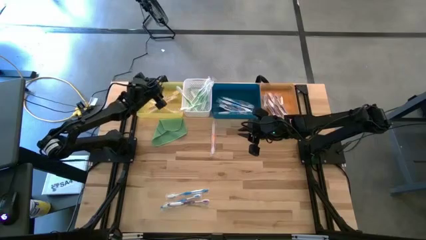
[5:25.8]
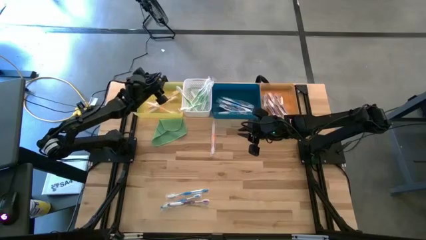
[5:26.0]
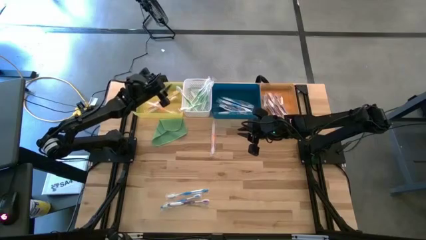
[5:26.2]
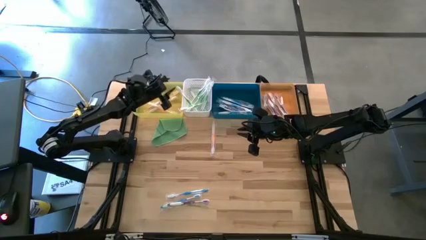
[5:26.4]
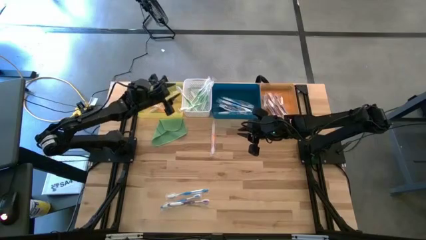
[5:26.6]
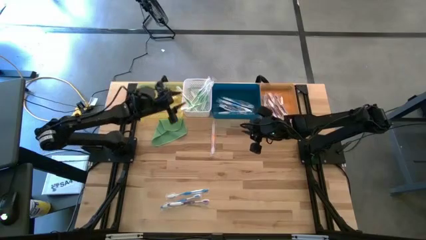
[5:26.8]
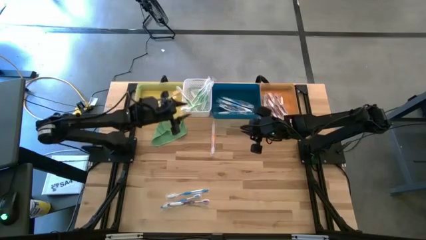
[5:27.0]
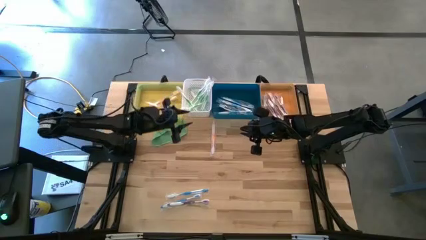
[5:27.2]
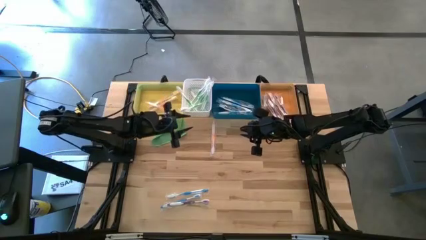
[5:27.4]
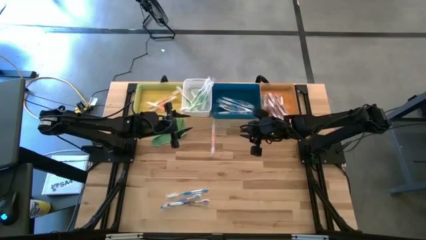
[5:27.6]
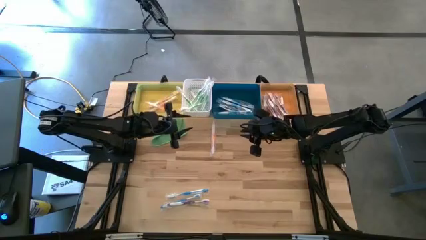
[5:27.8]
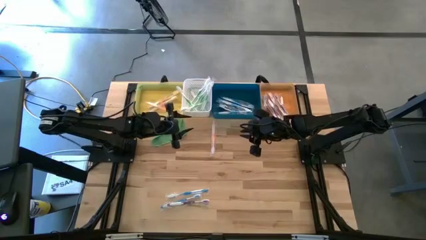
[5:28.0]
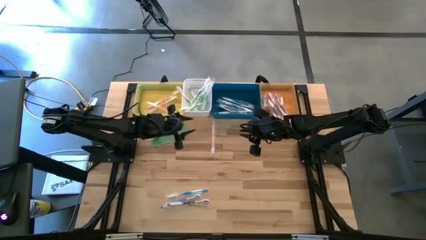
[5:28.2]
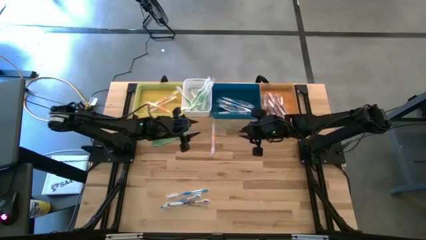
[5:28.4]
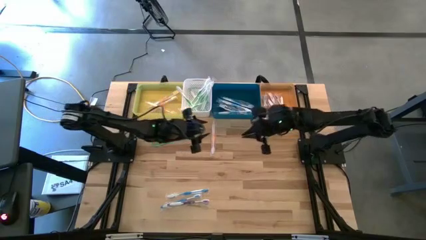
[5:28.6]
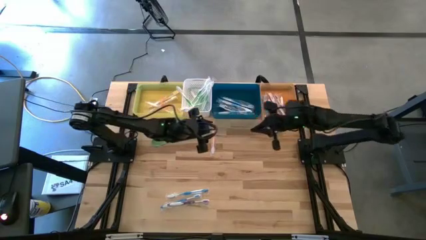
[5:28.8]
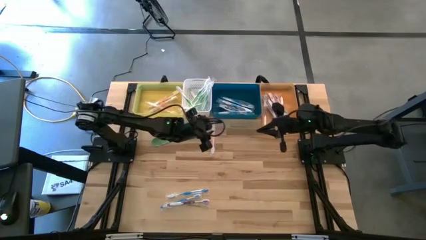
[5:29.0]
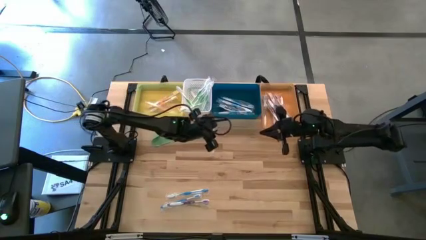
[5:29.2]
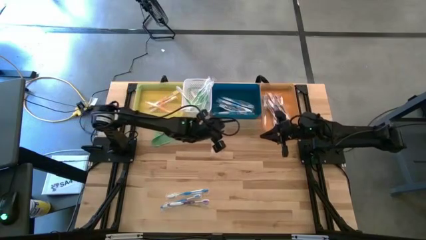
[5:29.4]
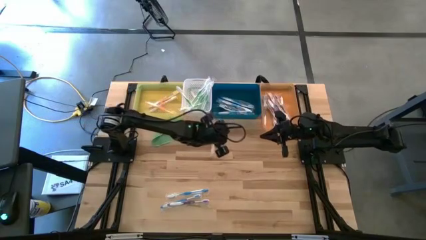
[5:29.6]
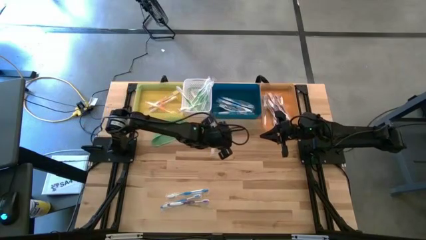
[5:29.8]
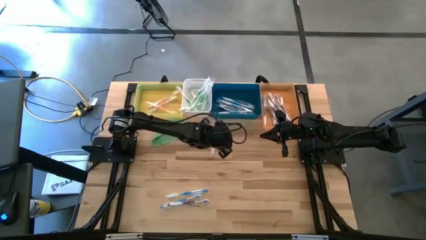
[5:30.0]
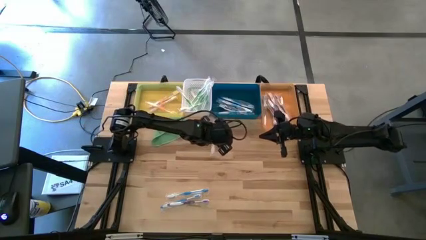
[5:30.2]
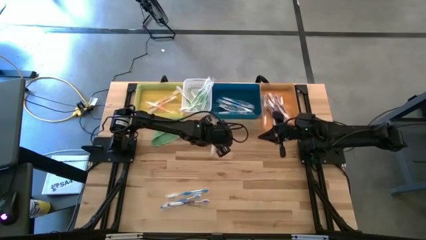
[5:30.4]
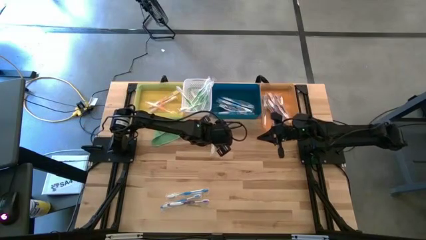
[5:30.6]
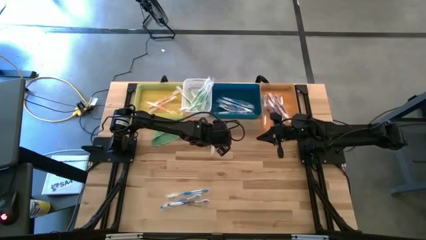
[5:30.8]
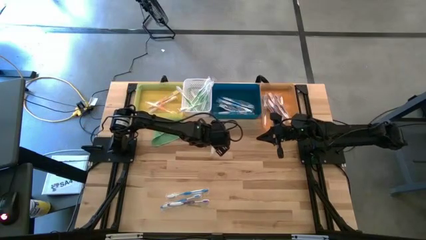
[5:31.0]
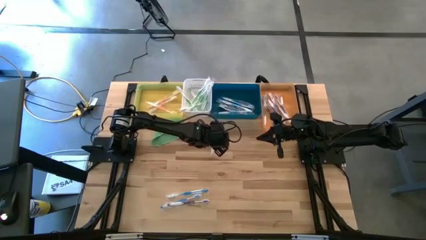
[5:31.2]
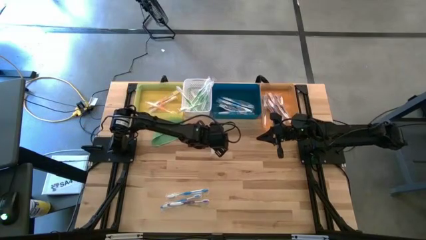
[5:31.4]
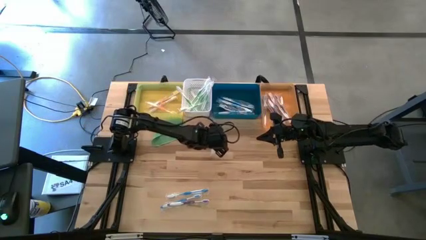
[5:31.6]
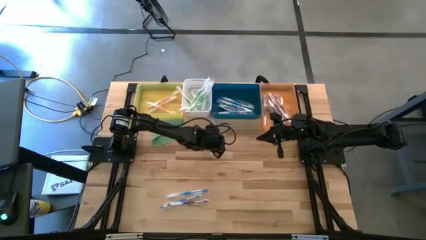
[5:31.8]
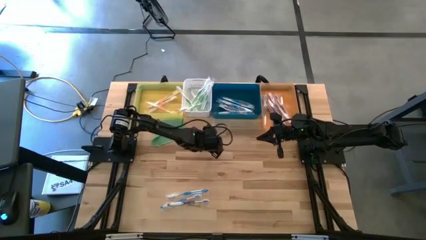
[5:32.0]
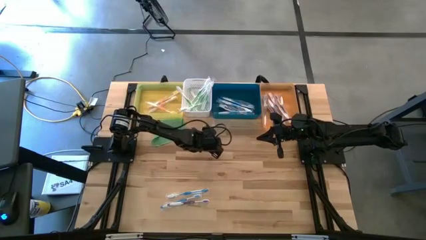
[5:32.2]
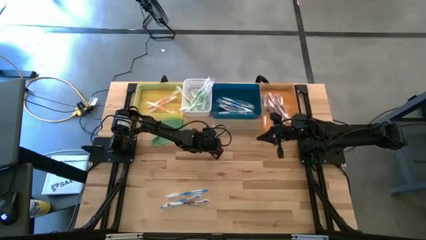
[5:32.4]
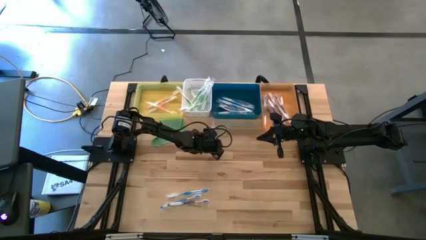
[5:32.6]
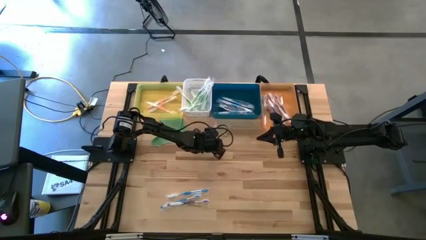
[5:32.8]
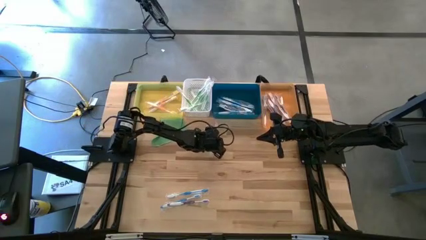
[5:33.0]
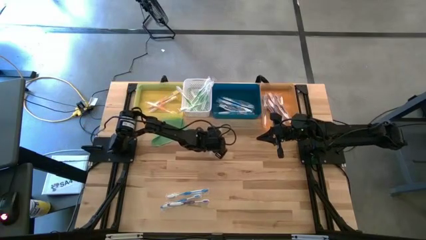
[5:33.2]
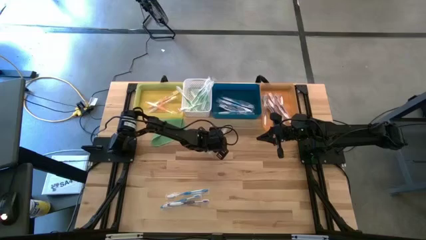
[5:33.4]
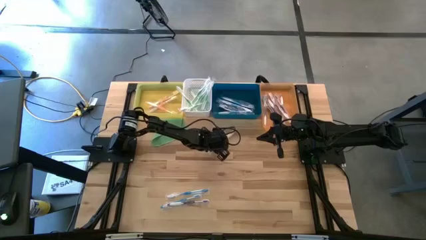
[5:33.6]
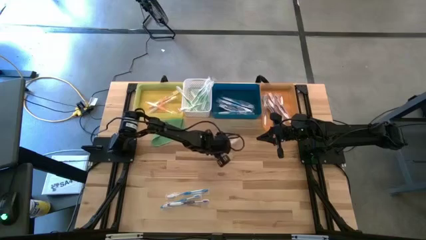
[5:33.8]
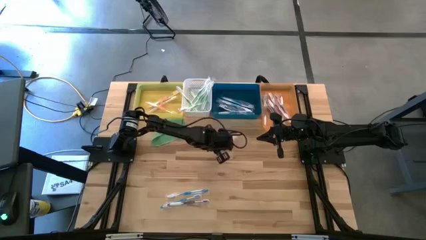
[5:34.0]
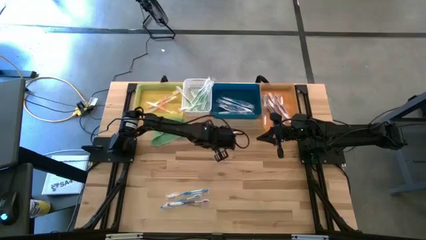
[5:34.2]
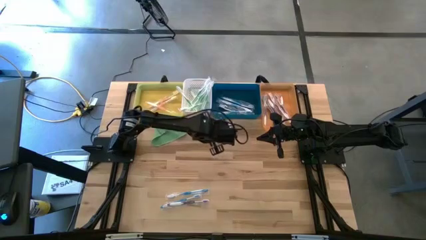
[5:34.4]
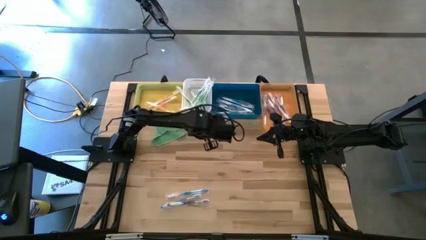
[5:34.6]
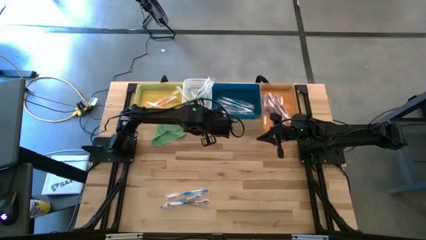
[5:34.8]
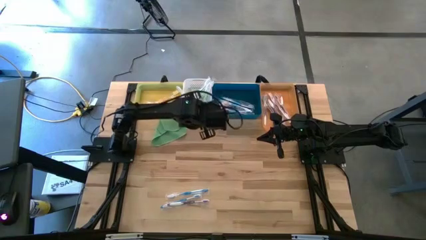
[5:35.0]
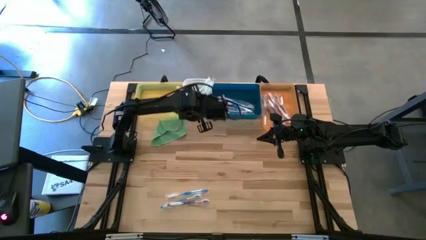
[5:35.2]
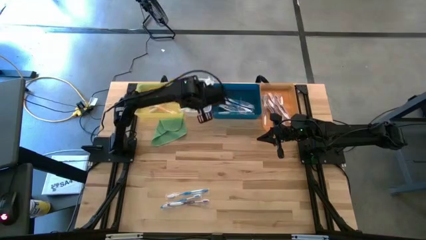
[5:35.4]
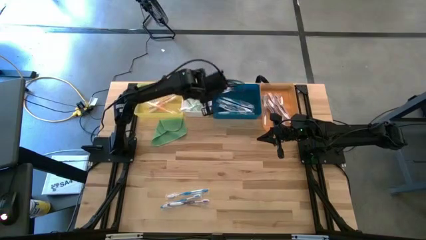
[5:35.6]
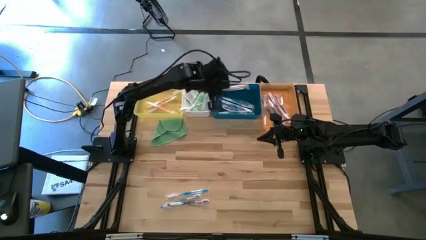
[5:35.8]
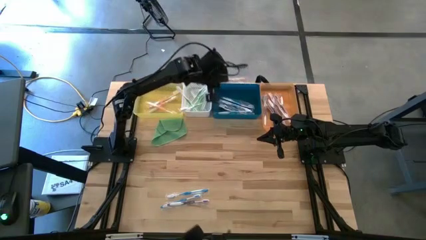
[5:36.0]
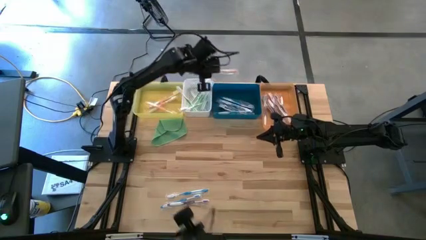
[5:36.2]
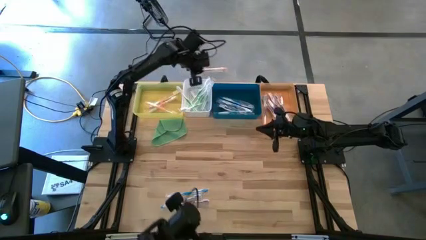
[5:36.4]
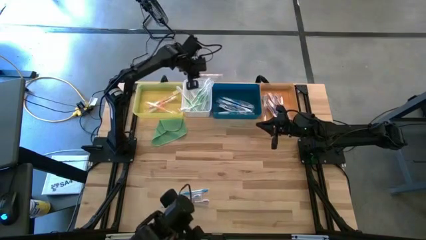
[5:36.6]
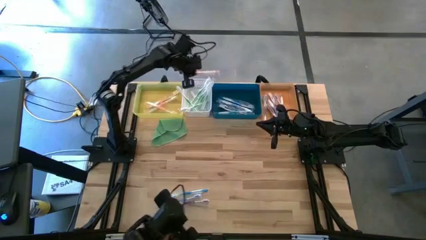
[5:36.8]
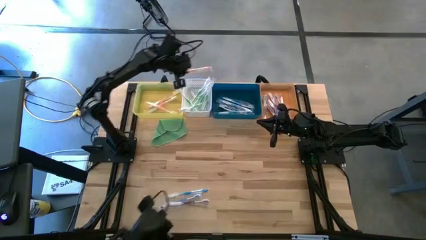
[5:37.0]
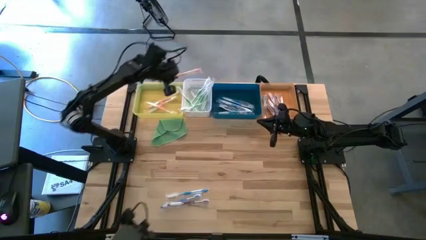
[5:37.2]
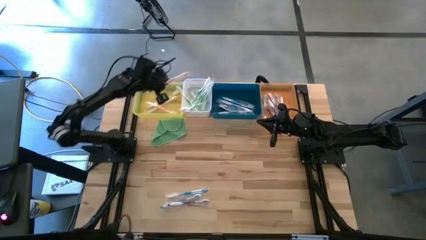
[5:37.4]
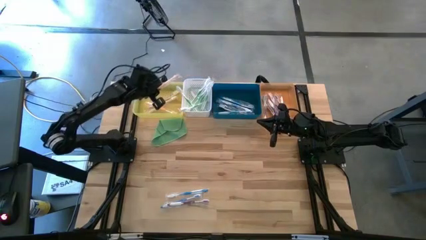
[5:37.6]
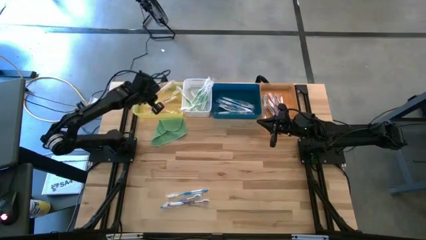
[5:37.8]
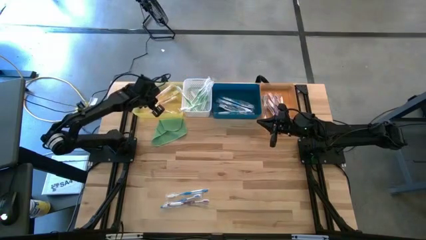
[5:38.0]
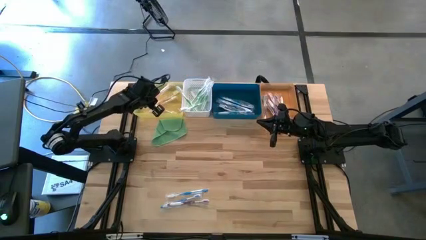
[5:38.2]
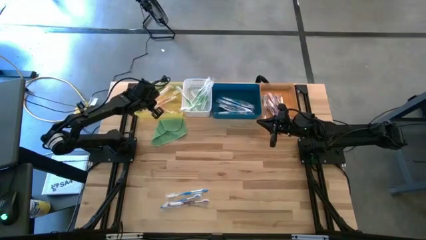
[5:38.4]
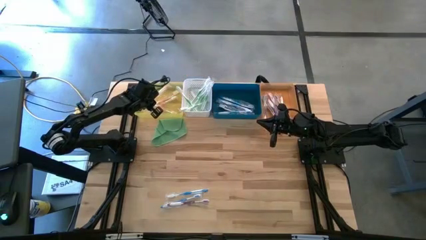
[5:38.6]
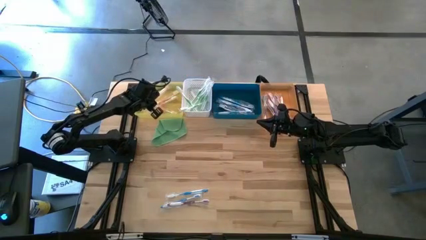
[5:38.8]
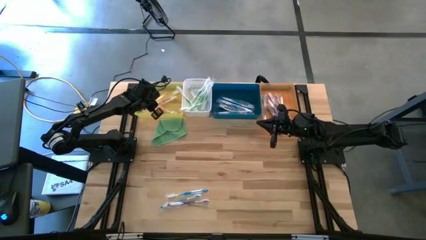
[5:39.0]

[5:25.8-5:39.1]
Task: Pick & Place Toothbrushes
Put the orange toothbrush into the yellow bin

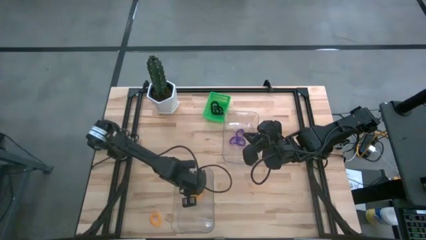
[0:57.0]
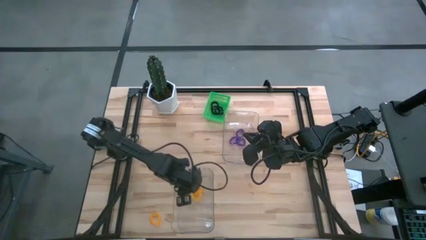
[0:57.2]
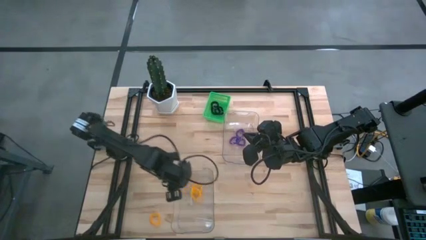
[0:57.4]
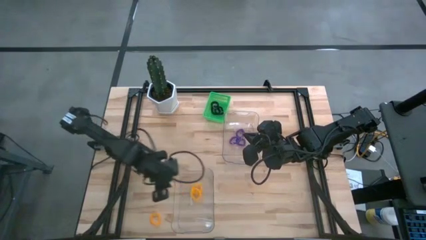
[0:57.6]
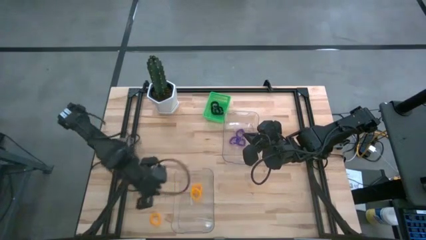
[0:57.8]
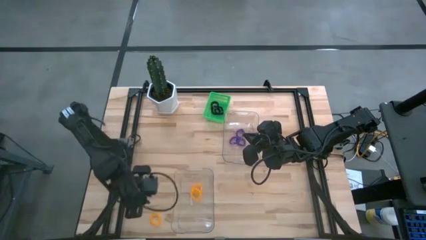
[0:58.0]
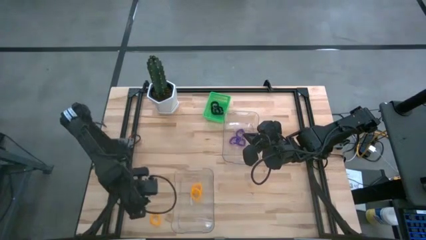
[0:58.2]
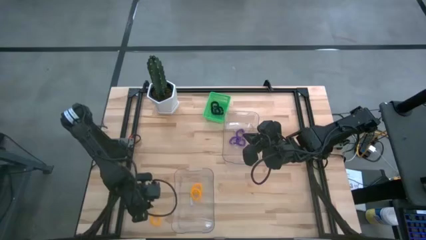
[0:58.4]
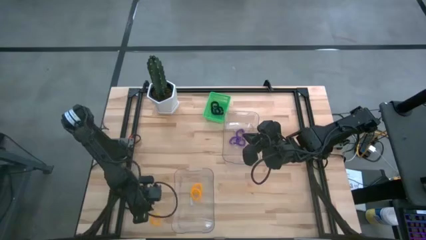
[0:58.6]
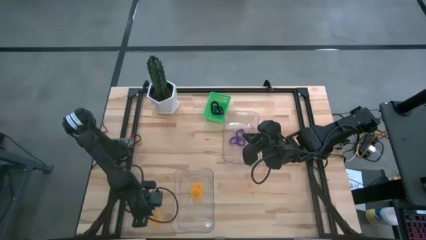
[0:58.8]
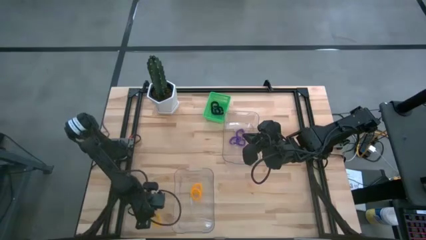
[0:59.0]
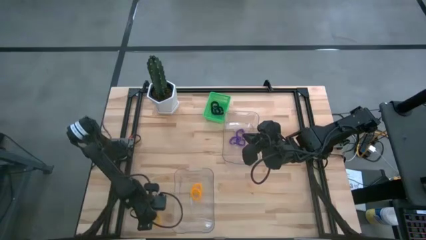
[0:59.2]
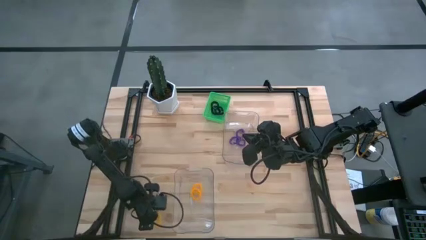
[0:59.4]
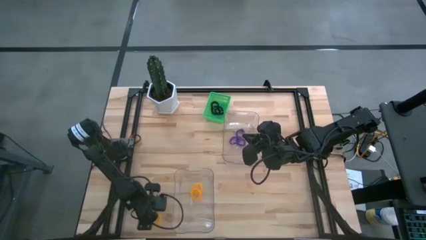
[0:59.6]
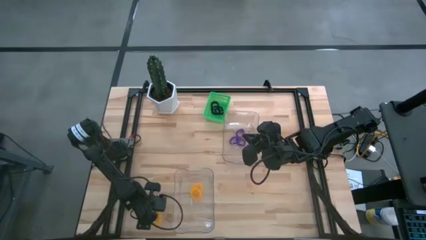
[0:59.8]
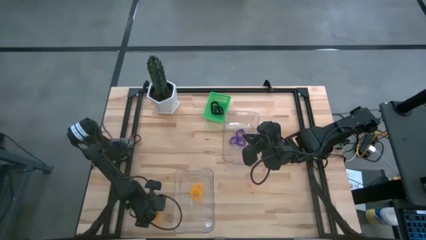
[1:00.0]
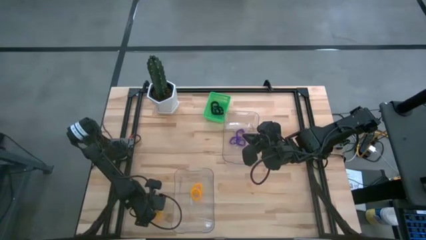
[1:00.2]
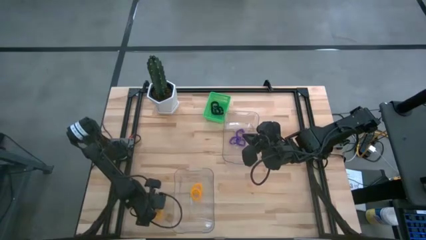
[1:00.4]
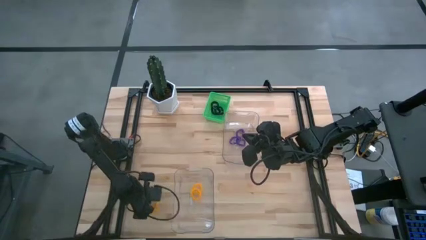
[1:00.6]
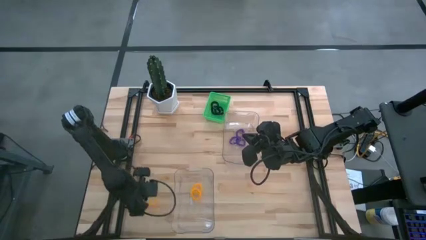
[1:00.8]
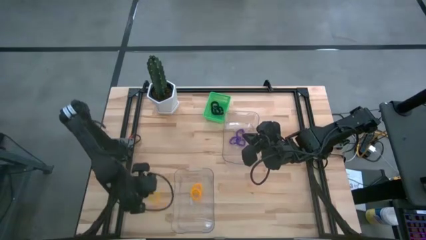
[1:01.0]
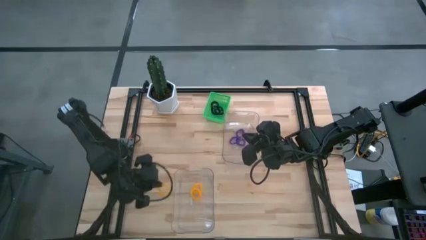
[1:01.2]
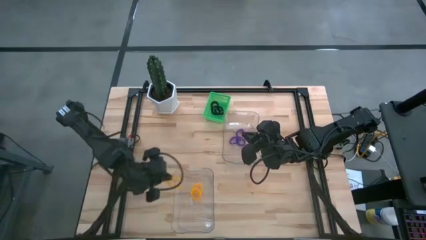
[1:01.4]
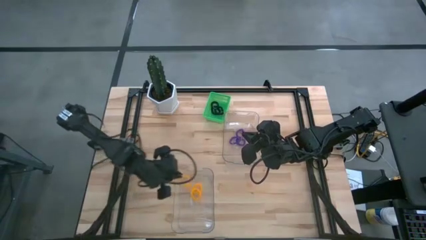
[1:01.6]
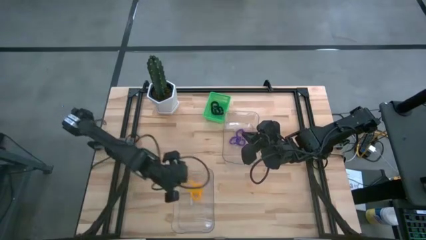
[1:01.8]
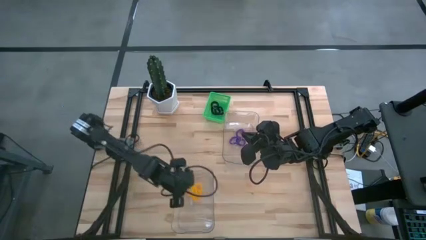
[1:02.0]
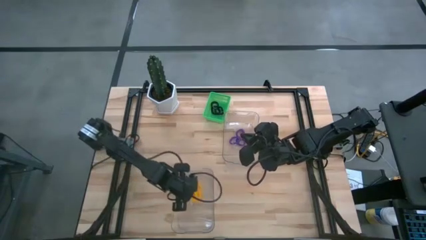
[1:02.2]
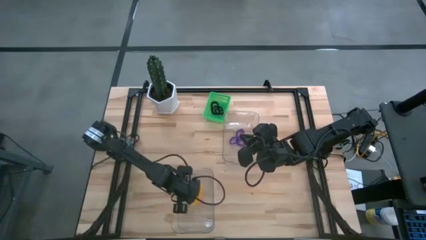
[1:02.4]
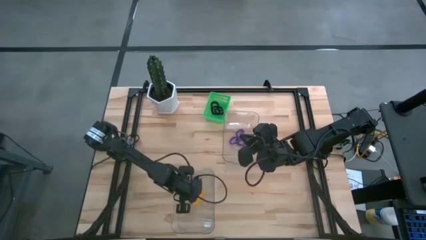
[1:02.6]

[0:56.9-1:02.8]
Task: Sort spring keychains
Put the yellow spring keychain into the bottom transparent bin
